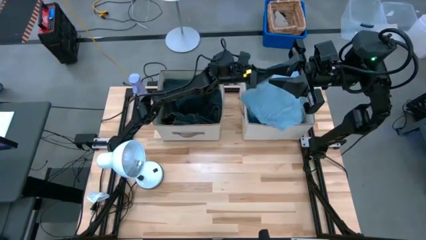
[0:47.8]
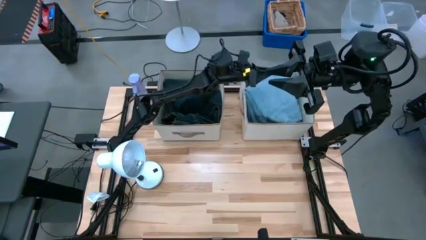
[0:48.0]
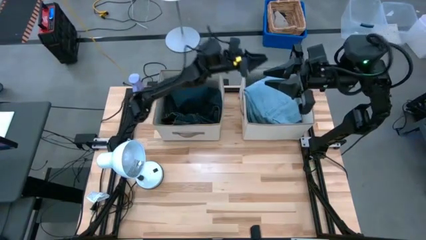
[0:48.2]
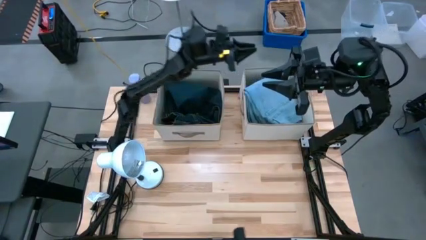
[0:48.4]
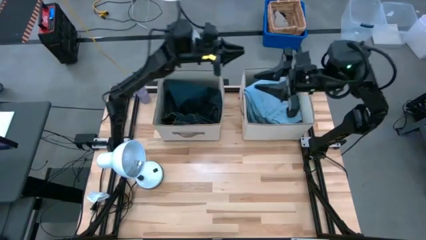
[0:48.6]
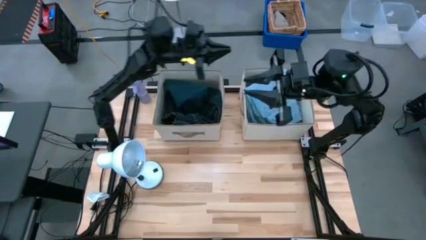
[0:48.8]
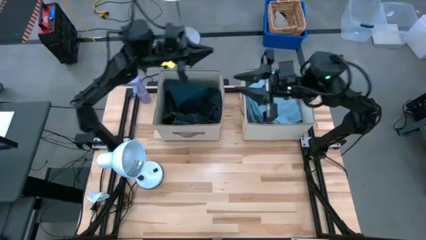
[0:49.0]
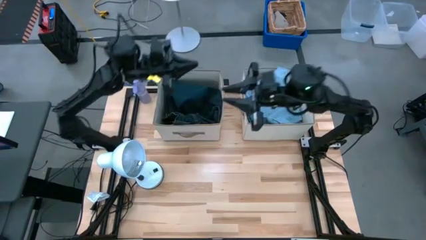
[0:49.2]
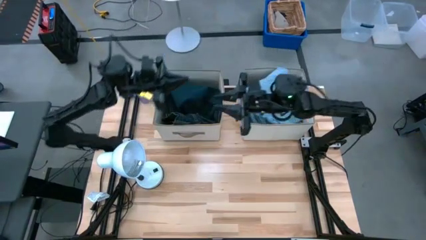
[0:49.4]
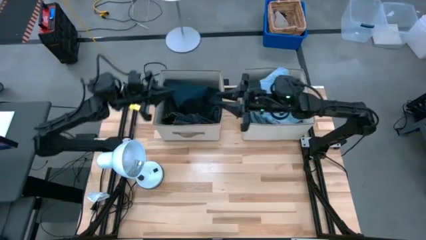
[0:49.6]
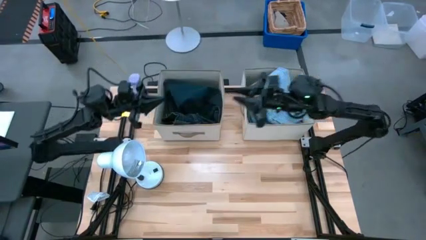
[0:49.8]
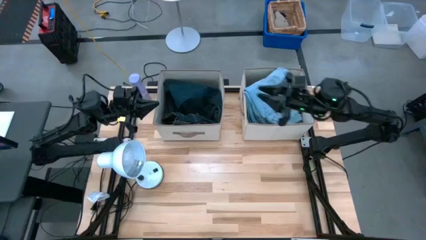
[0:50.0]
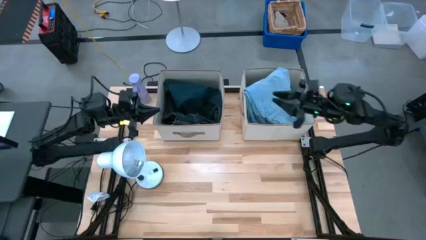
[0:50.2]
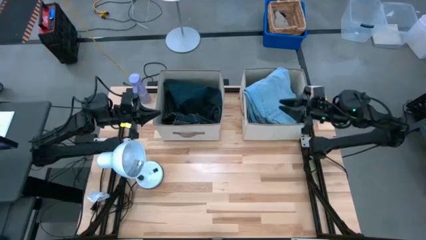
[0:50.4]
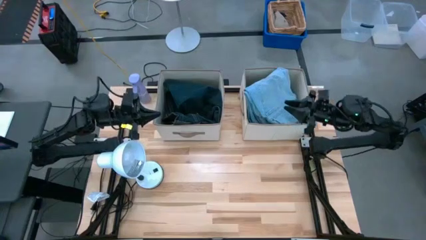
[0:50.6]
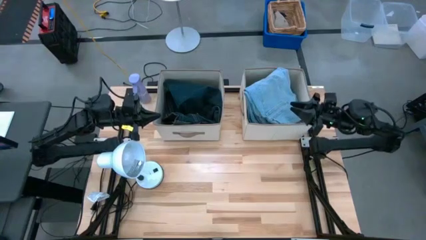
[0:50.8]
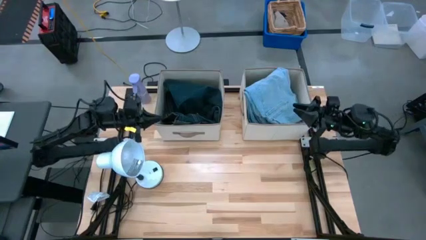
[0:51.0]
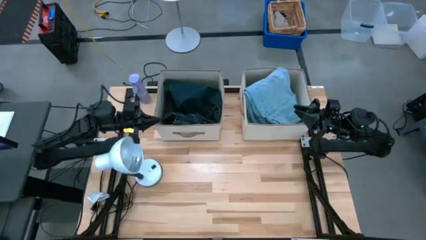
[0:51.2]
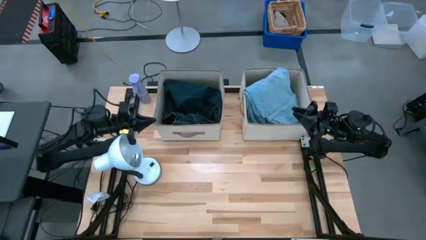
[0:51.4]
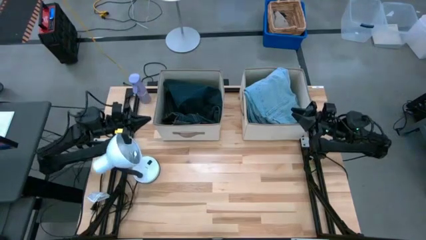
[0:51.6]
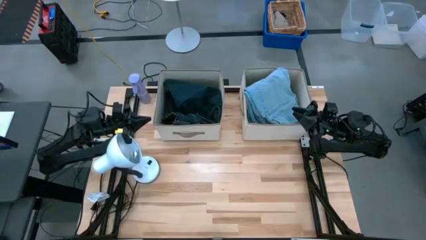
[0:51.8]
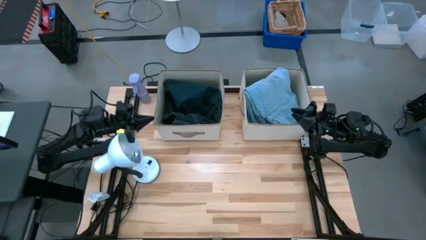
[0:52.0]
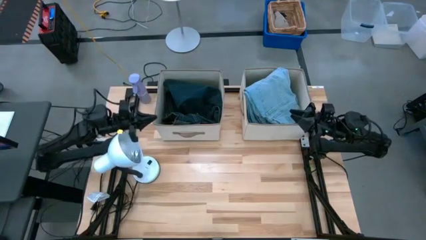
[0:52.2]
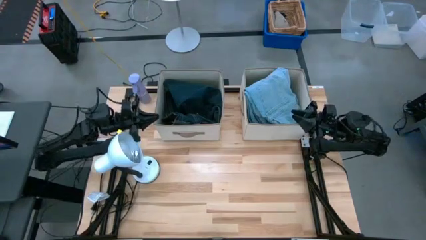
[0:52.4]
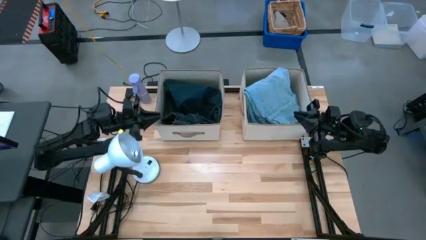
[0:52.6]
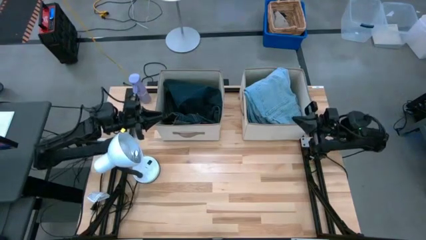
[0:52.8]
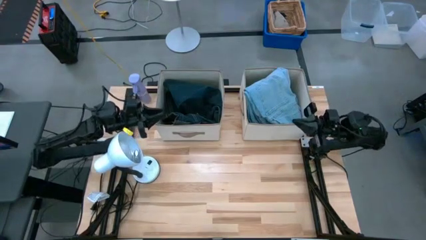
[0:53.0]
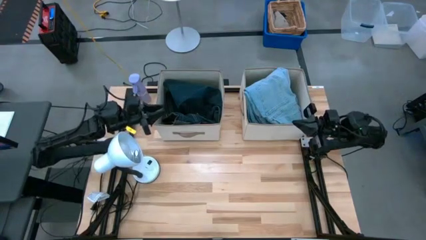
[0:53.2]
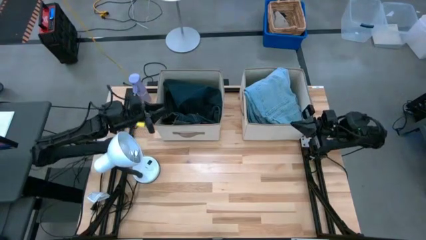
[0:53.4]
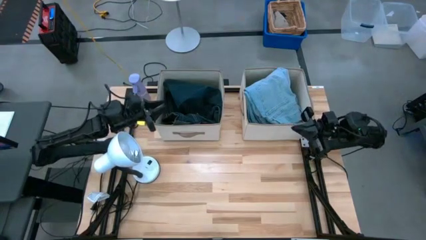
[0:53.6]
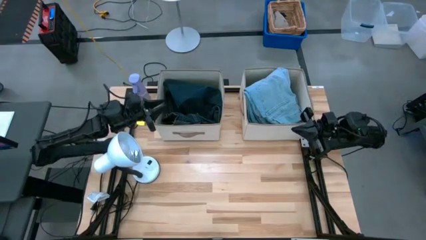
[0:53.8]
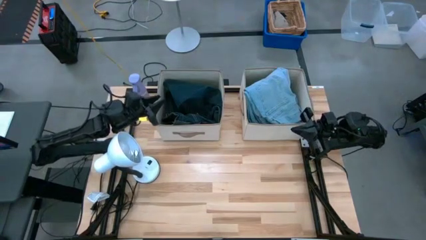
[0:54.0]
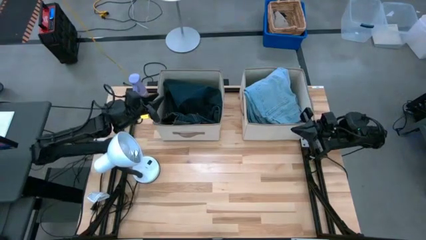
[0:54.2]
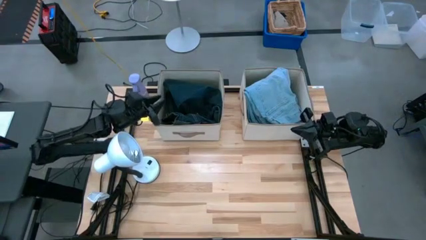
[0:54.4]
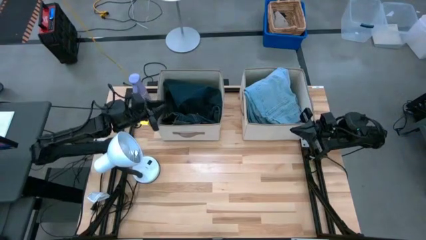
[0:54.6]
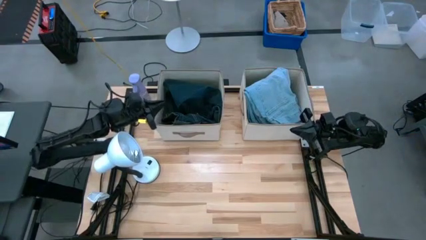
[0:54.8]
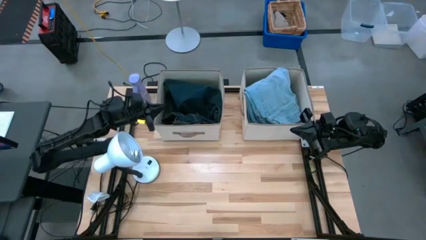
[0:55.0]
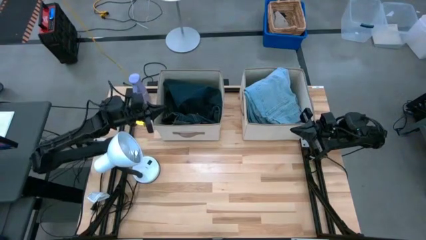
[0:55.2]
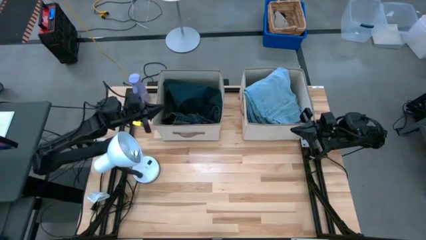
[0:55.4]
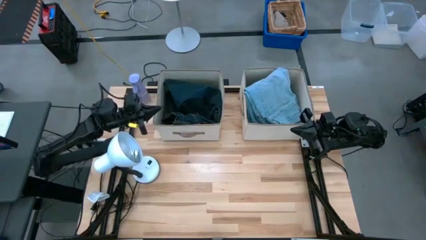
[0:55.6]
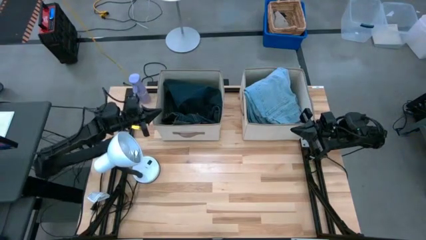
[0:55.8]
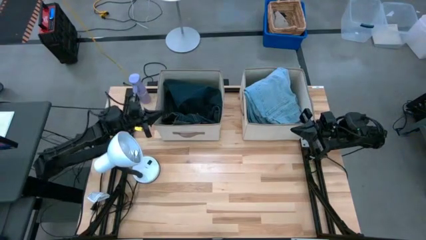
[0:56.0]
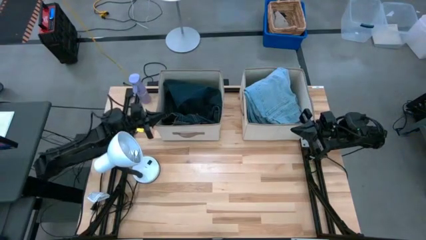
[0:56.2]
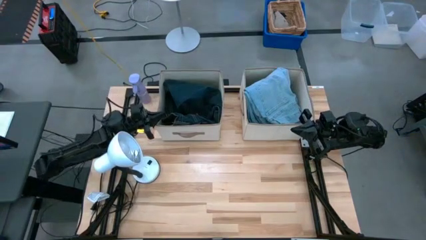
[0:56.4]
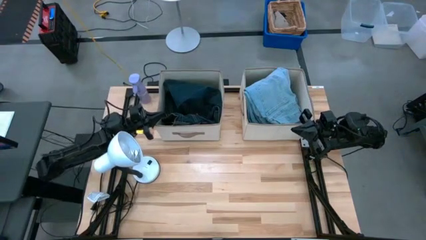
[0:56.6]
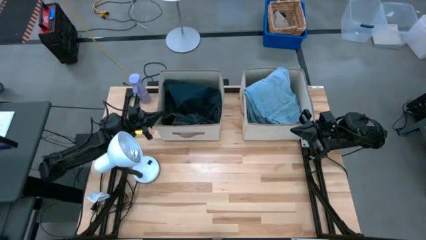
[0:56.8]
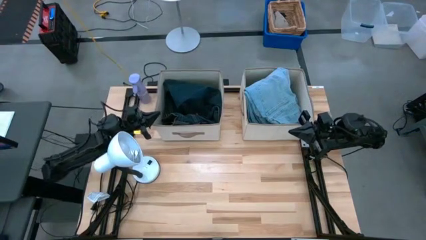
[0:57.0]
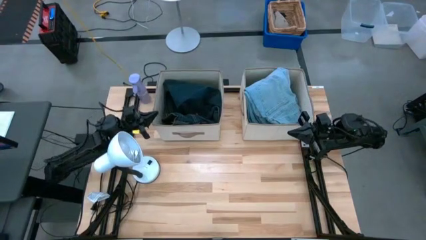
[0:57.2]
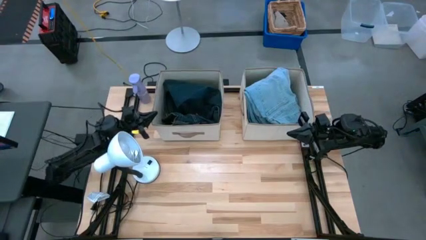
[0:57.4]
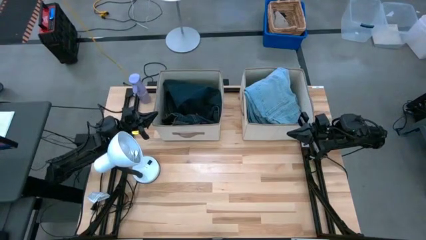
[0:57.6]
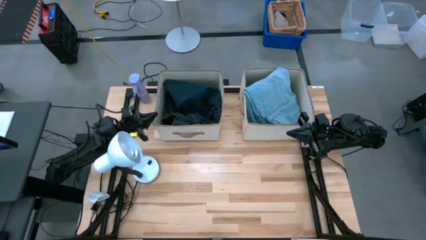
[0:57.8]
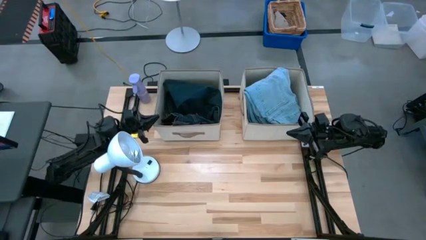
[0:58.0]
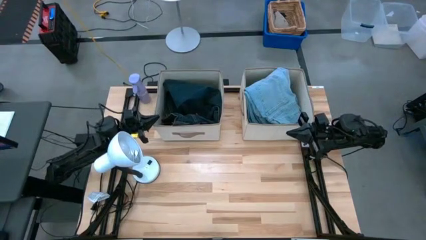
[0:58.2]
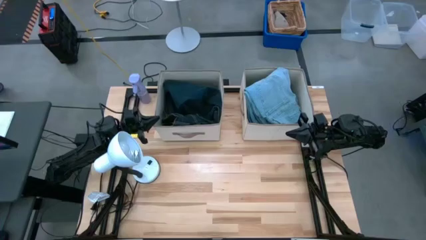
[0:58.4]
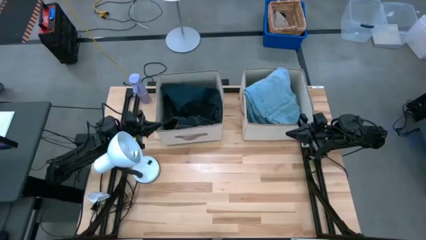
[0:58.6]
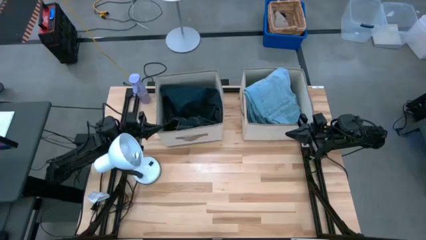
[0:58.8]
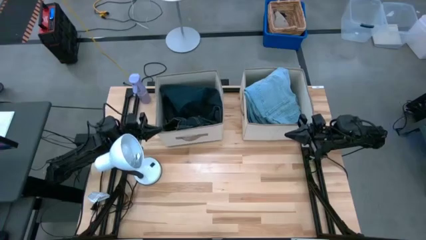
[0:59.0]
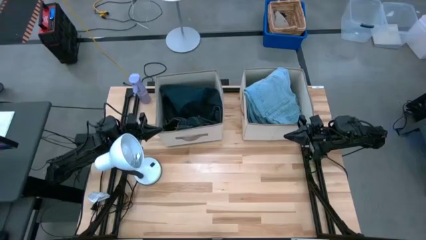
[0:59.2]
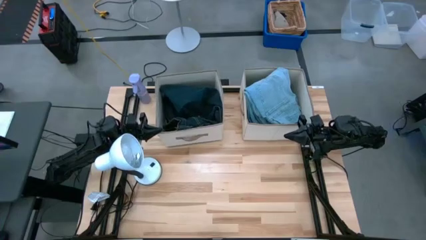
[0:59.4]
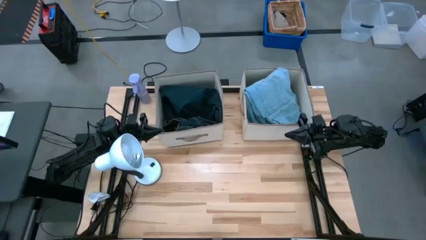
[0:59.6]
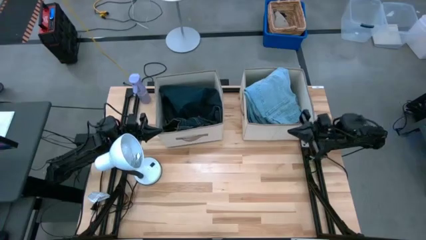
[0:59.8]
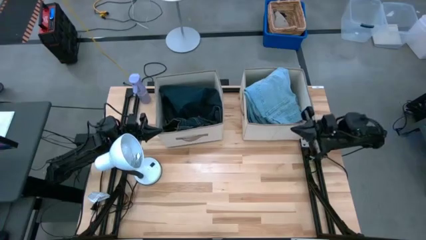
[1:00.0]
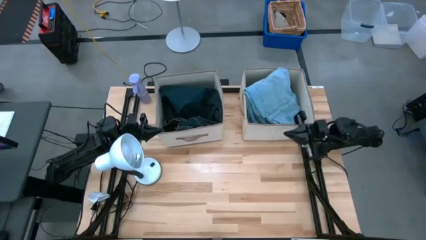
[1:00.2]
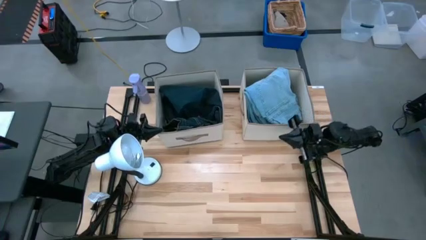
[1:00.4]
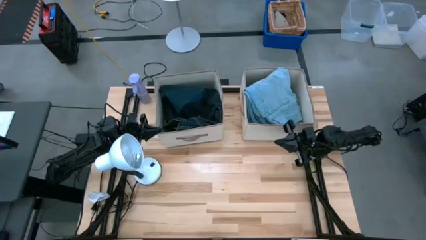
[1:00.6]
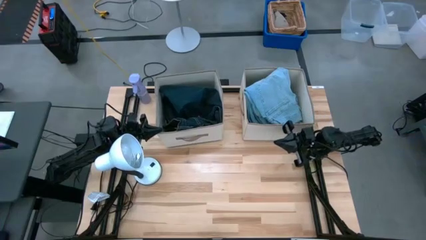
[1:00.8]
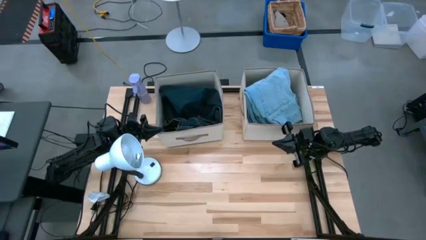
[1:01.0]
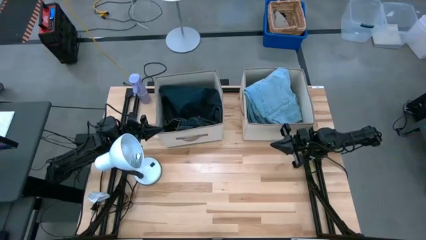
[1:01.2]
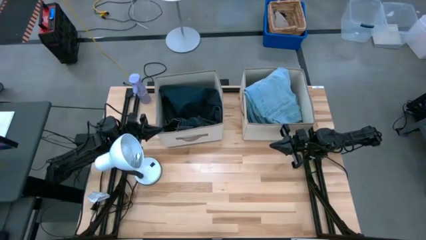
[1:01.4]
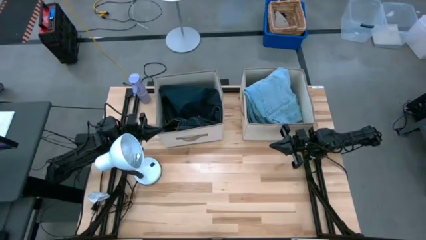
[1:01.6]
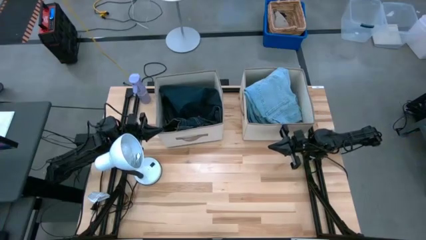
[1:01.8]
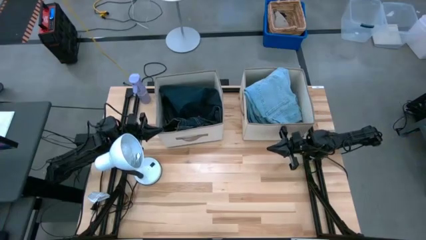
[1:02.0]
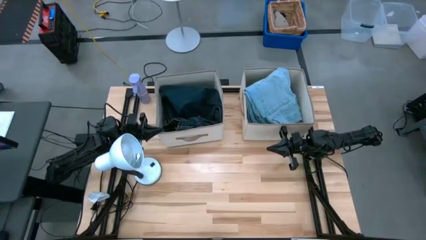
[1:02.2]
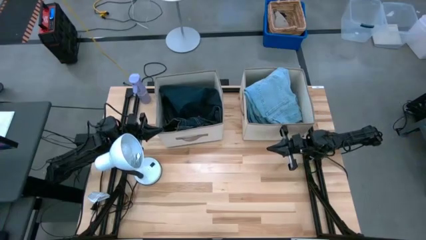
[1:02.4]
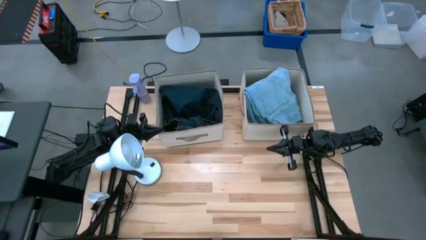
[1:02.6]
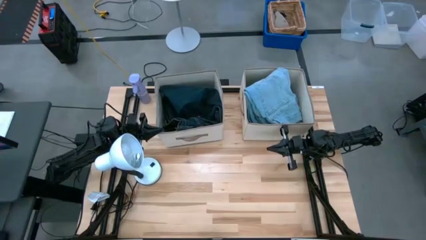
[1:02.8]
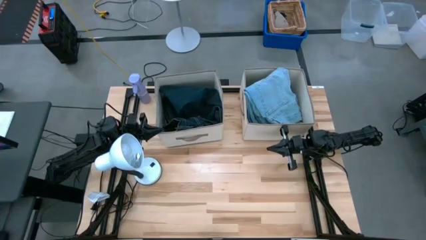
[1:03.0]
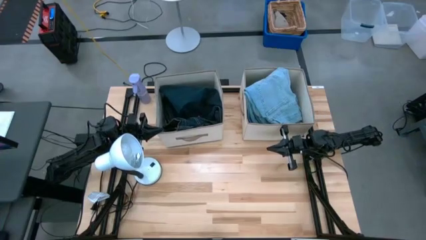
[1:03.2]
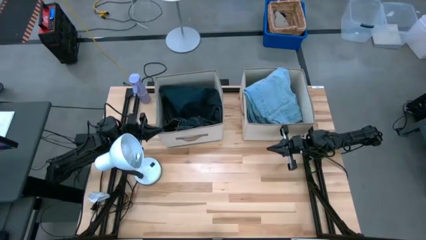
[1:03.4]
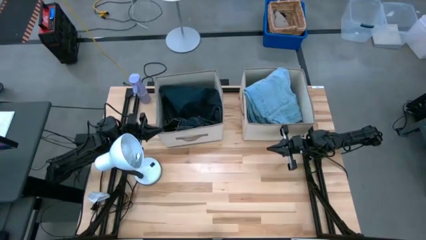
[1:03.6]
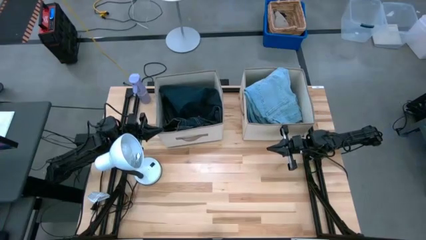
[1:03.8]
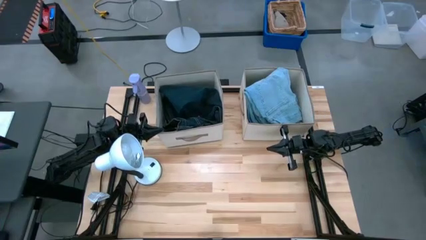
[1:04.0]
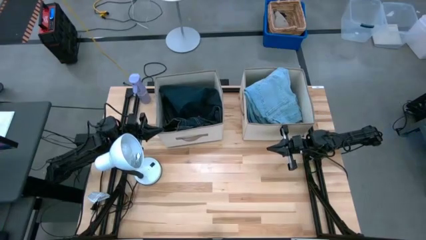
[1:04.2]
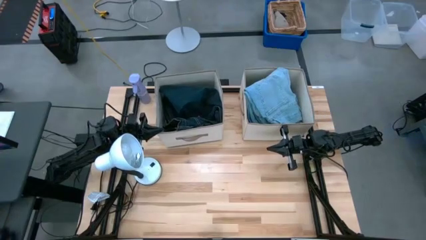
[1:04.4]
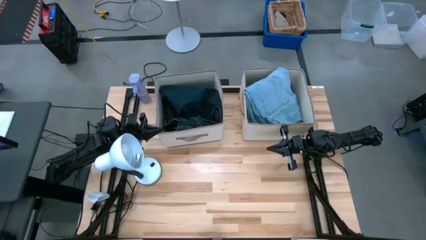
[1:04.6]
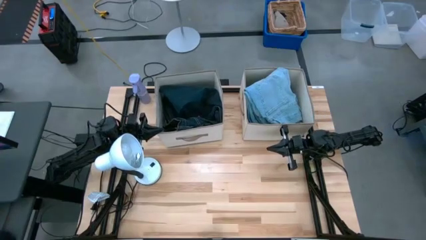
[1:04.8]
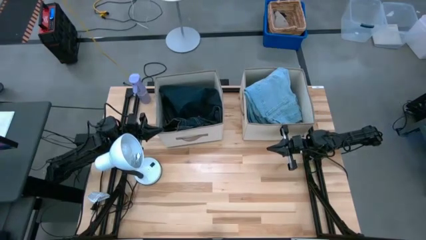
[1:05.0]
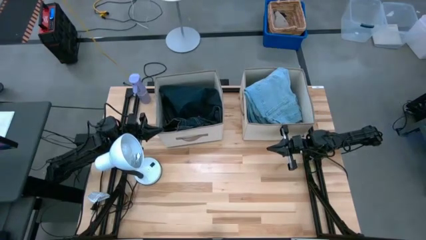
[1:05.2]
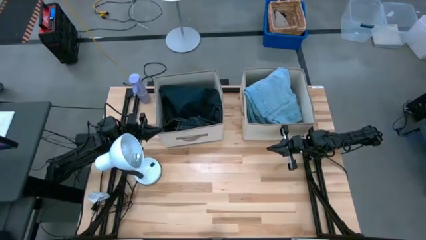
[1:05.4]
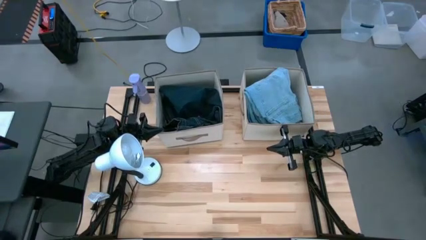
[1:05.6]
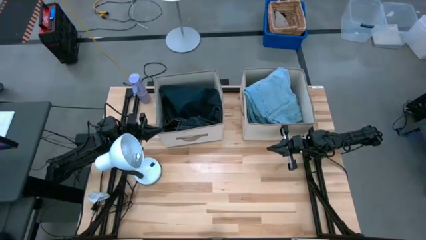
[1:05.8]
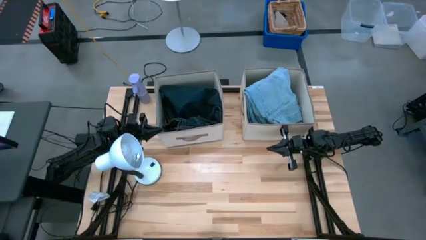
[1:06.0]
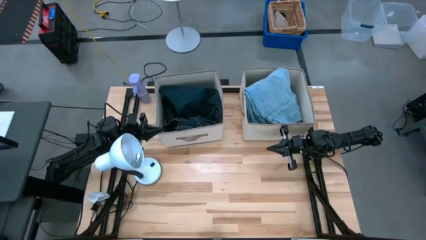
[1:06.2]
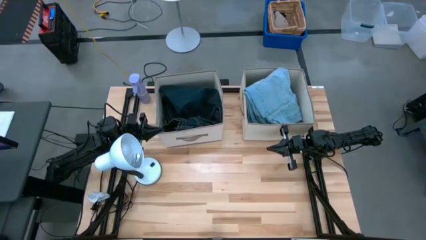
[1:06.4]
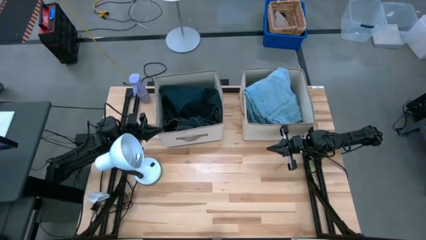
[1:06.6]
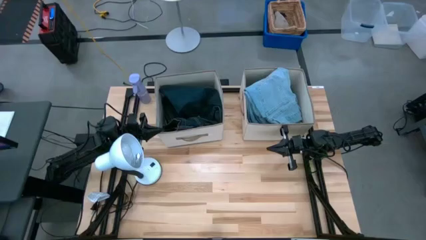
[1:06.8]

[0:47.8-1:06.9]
Task: Sort clothes
Return to Home Position
